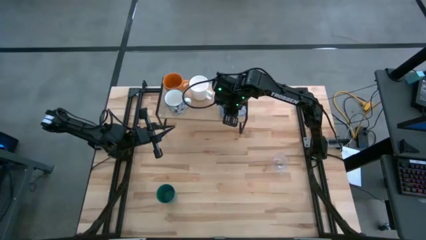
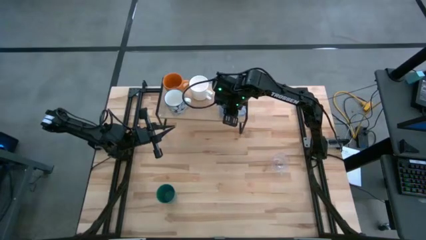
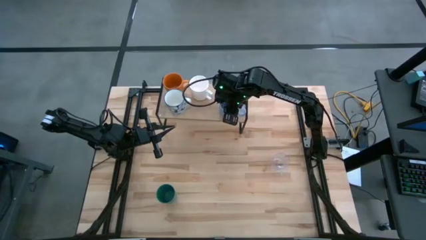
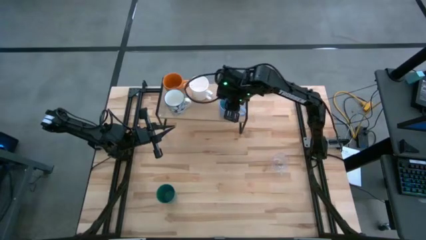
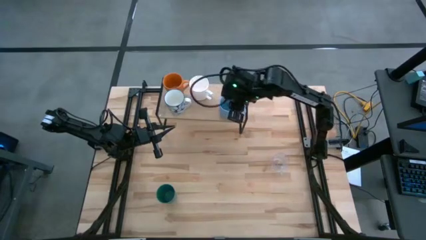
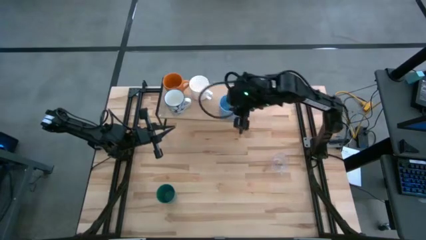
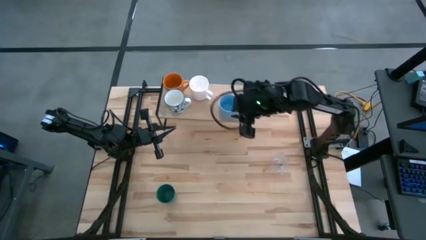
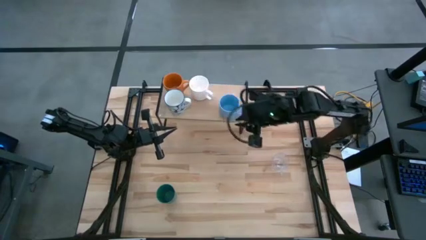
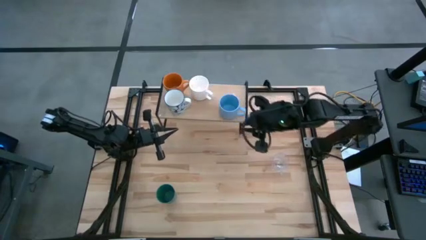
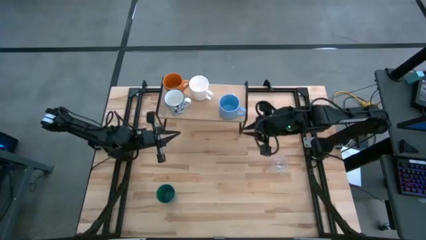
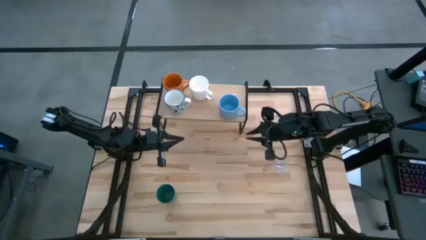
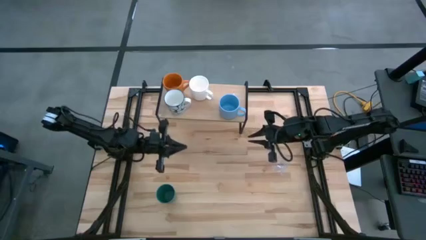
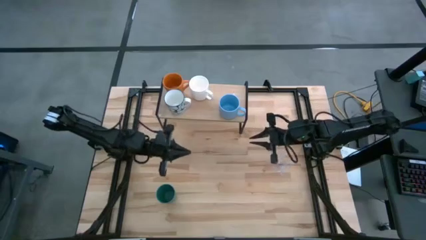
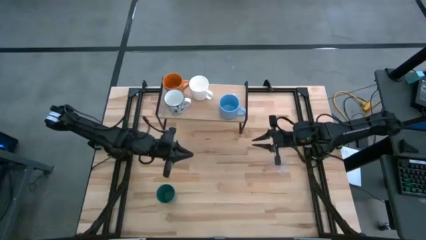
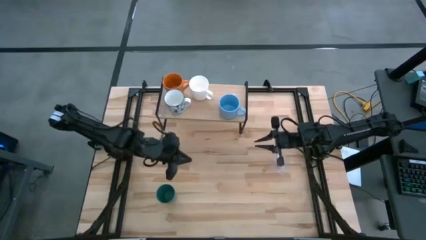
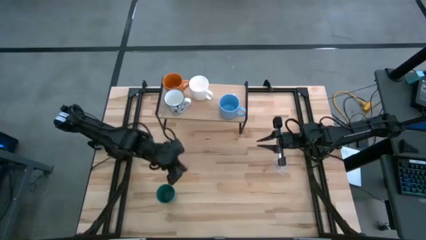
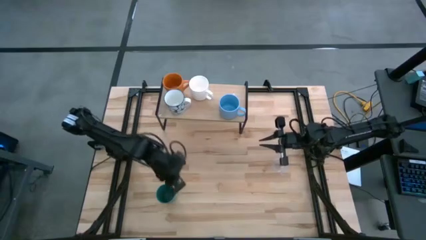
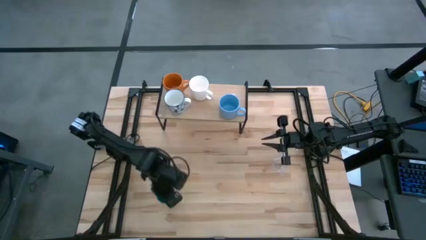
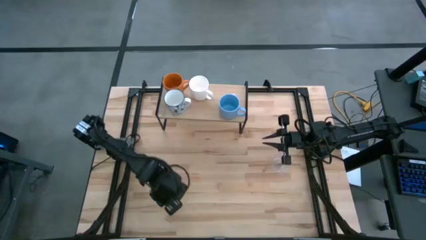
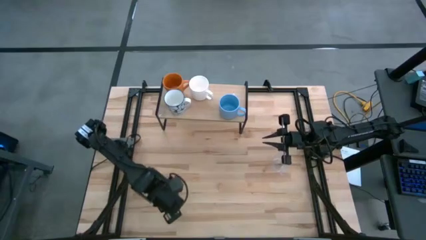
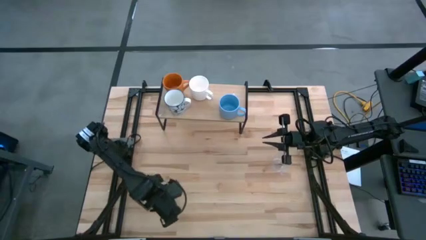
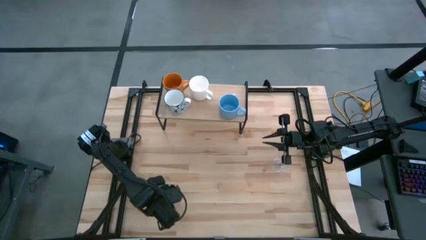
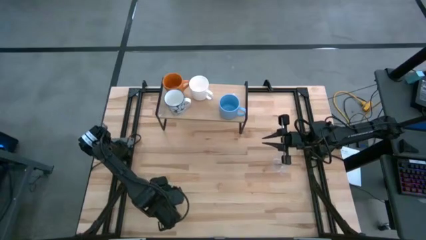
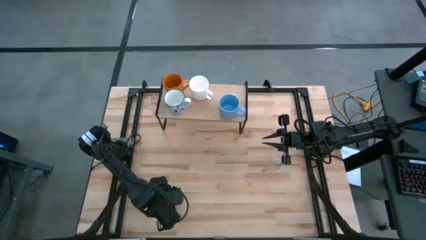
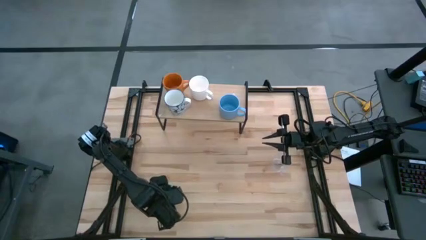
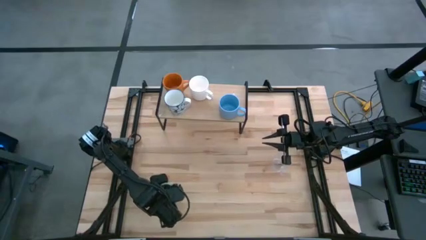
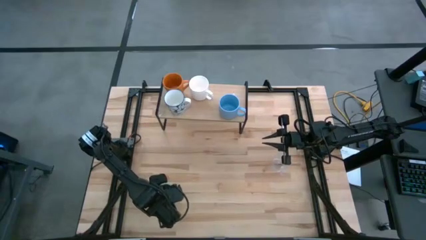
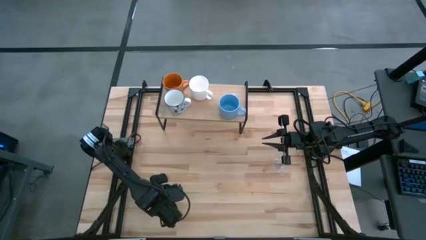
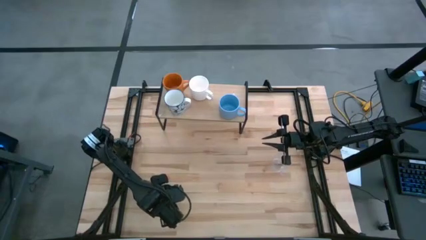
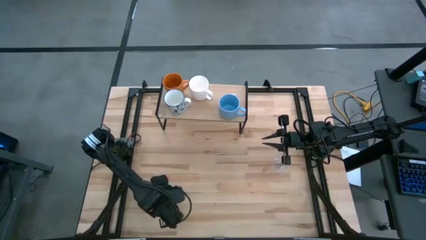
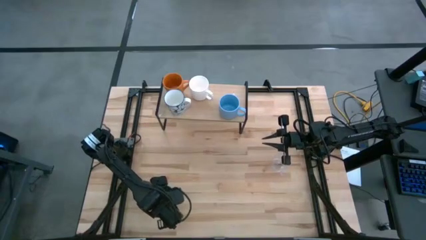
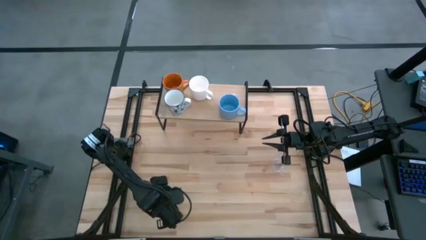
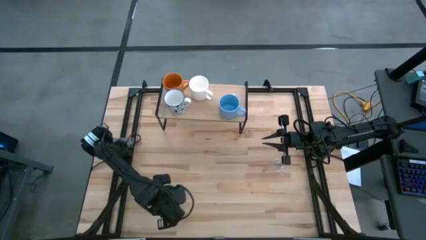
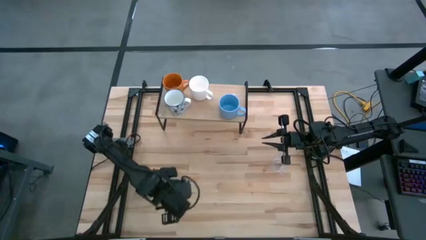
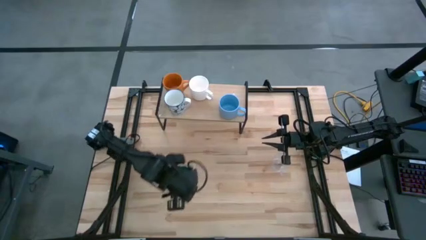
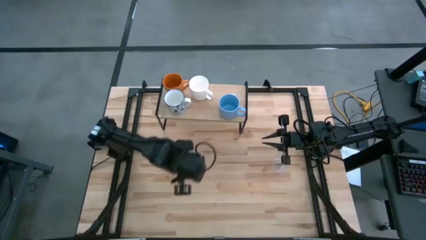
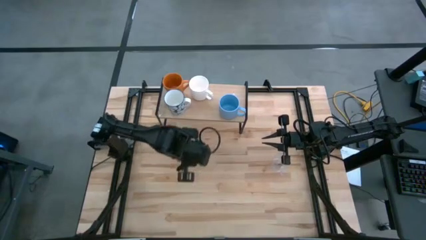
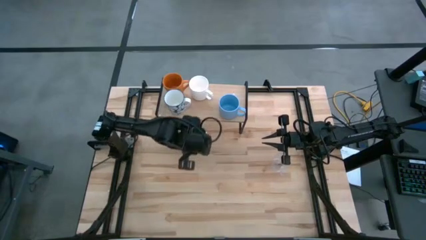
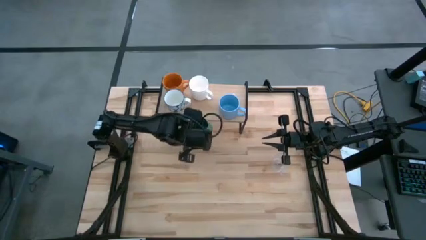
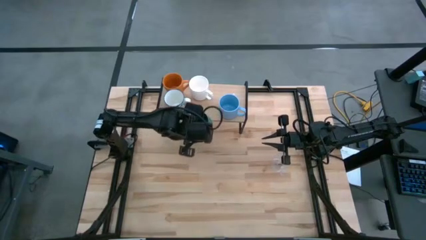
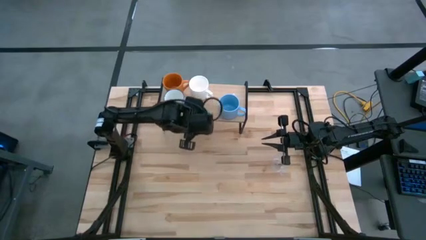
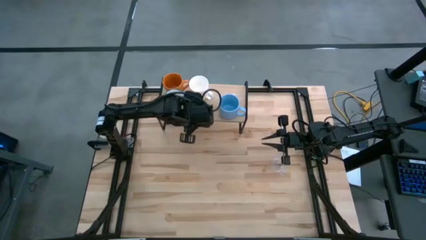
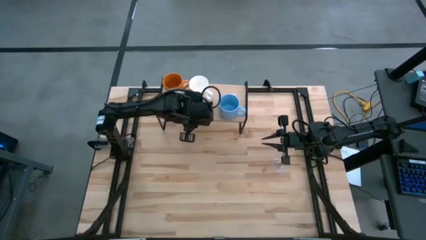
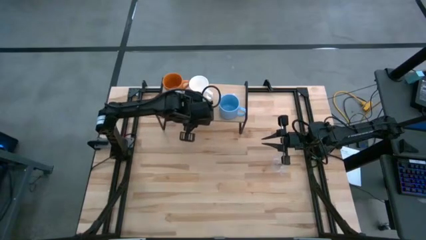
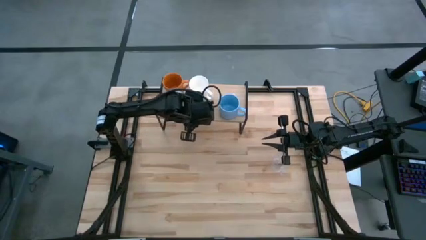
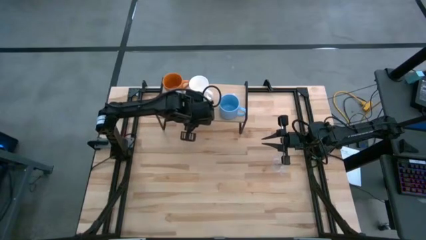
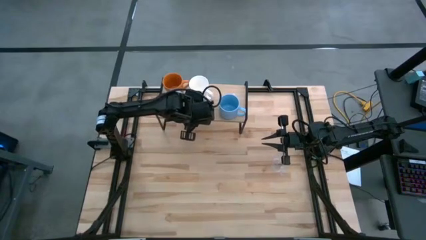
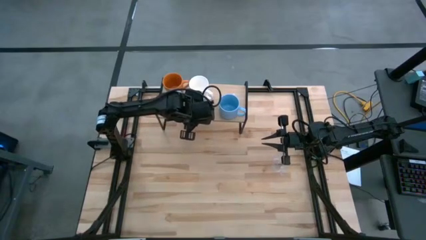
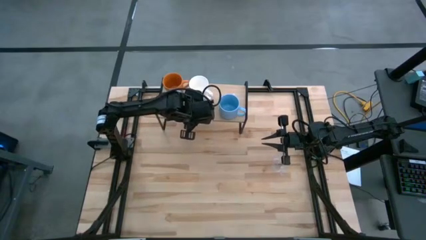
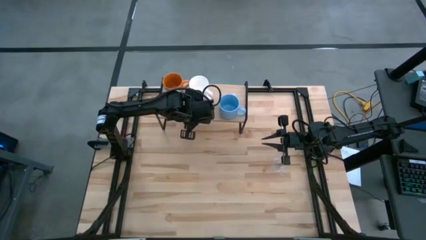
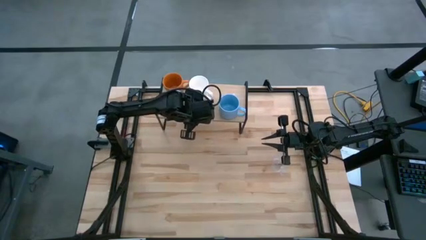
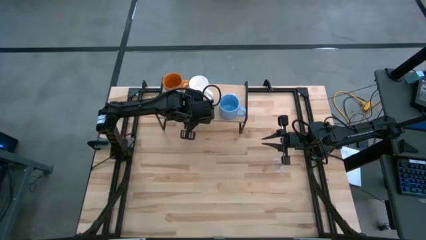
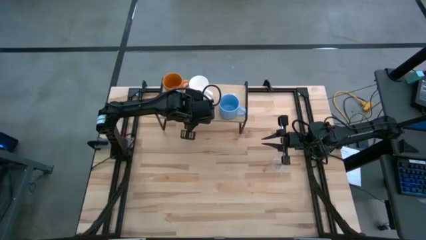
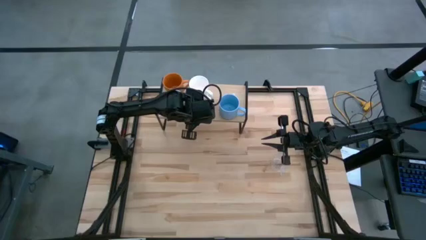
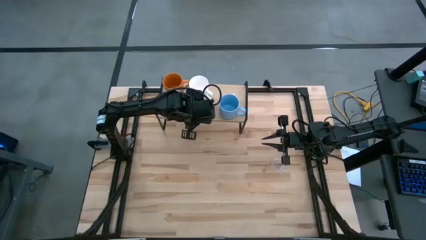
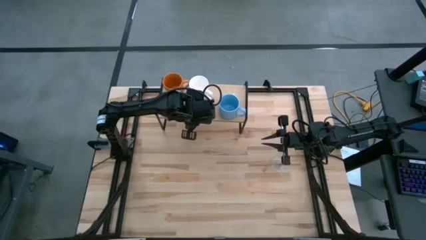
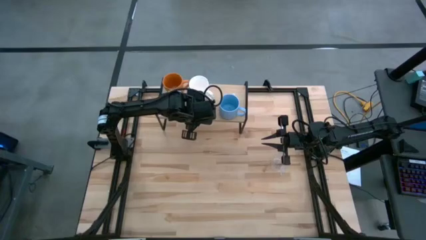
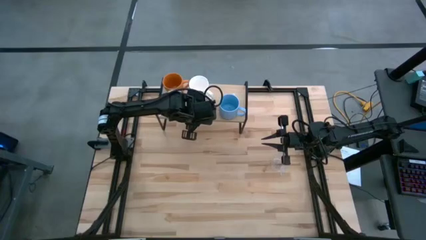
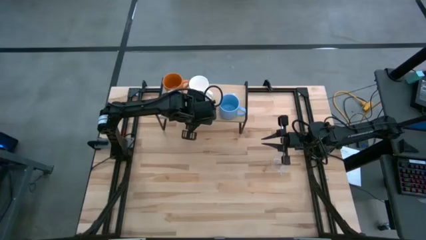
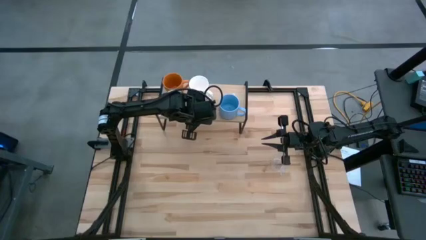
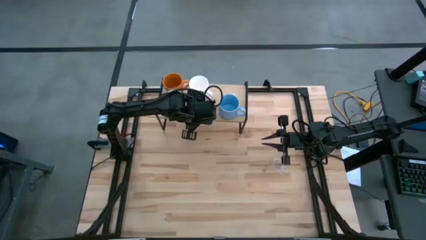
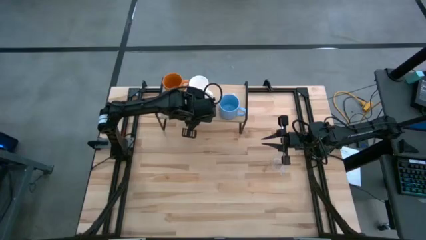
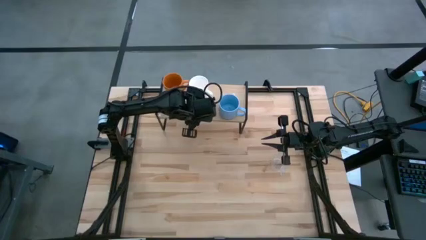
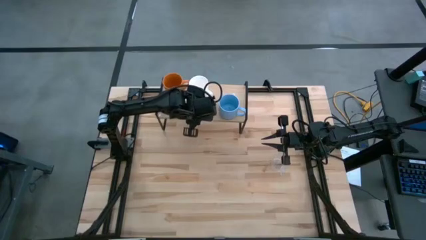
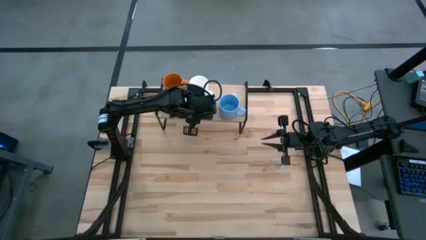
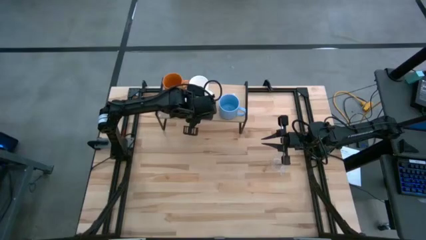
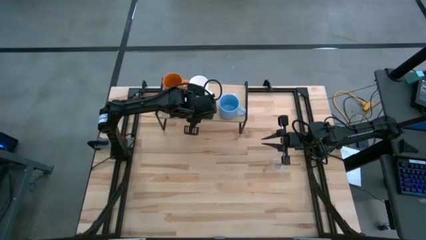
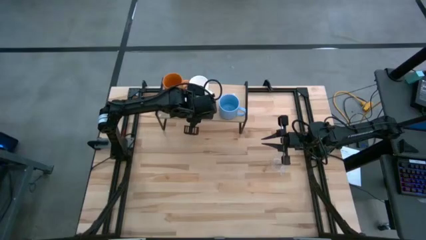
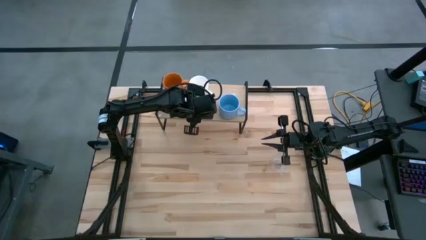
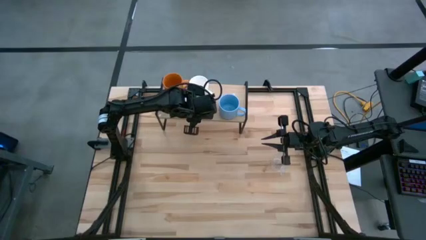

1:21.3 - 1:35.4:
Task: Stack small to large cups/mugs on shelf
Put the green cup on the shelf
